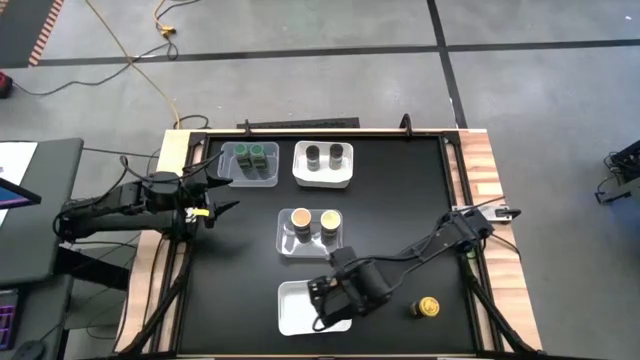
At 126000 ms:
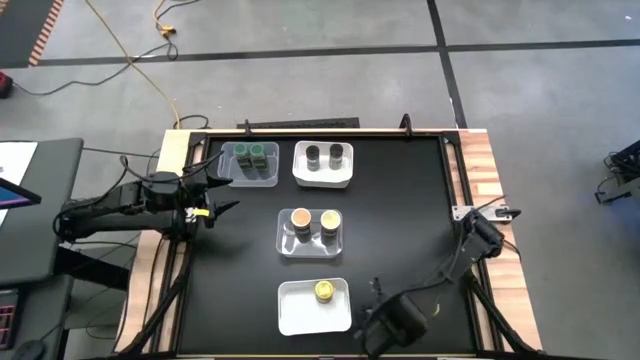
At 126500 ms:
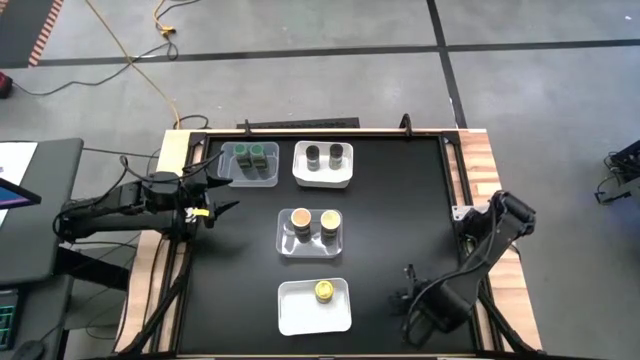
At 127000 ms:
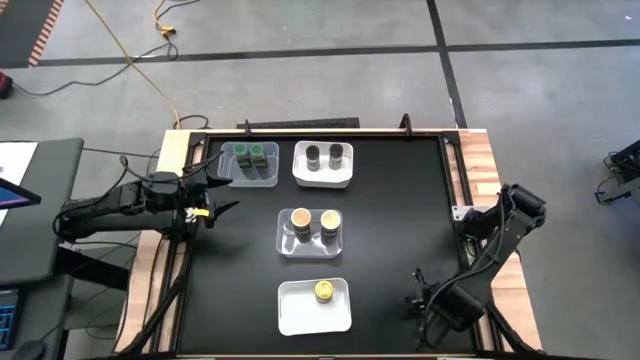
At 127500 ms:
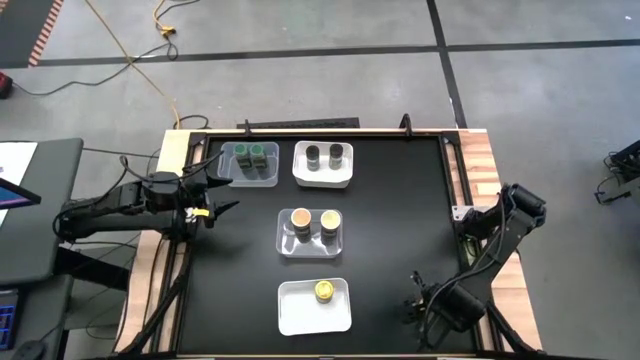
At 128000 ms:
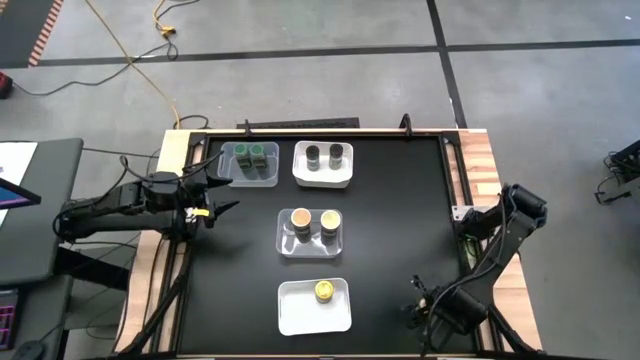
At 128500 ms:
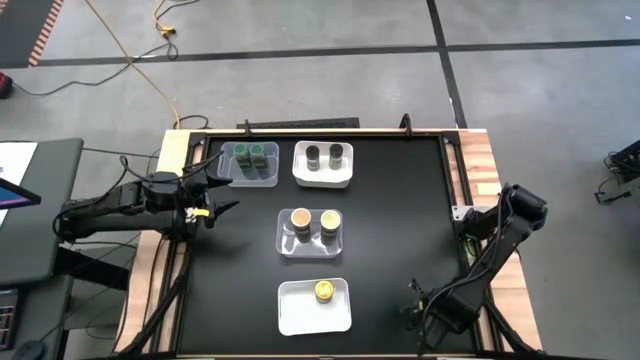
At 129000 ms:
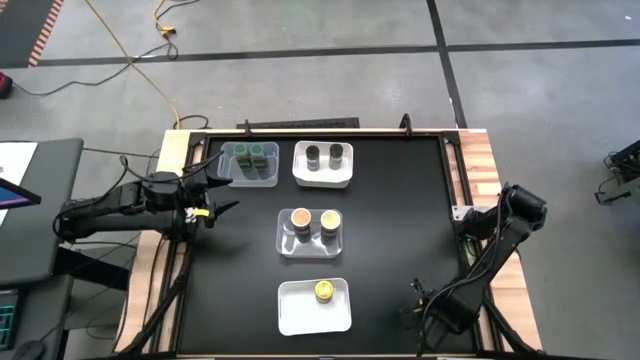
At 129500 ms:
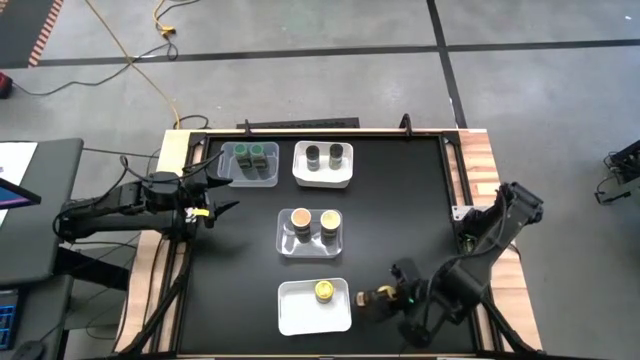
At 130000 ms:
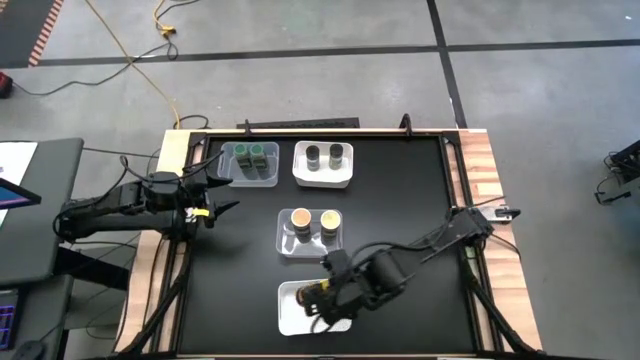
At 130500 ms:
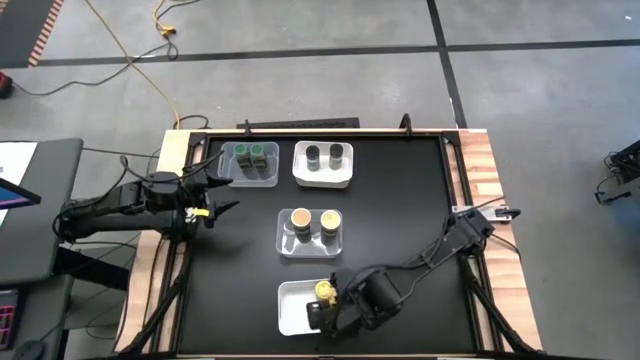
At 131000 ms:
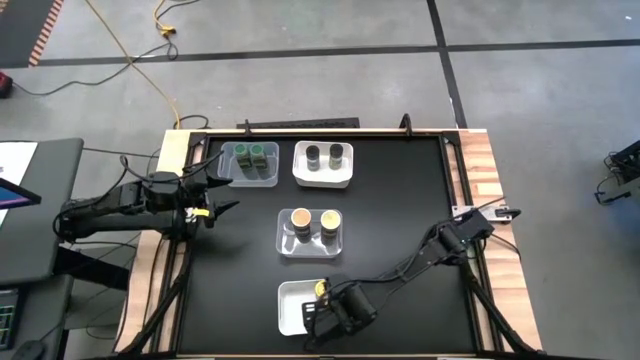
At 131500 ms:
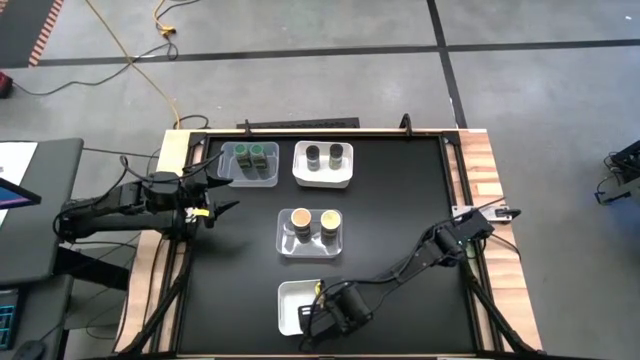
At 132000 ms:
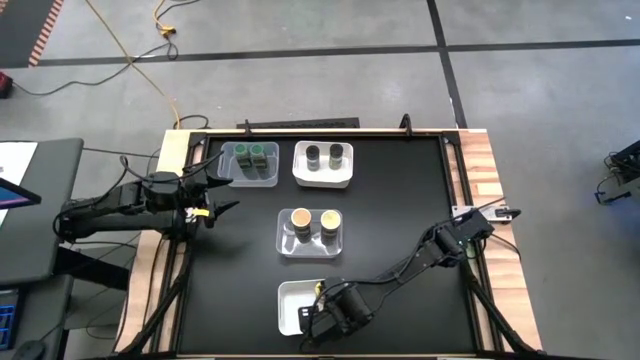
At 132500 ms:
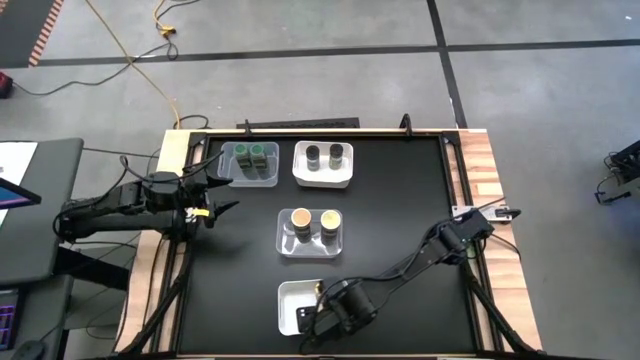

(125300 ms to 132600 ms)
Task: Sort spices by type
Put the yellow seasoning bottle into the bottom white bin

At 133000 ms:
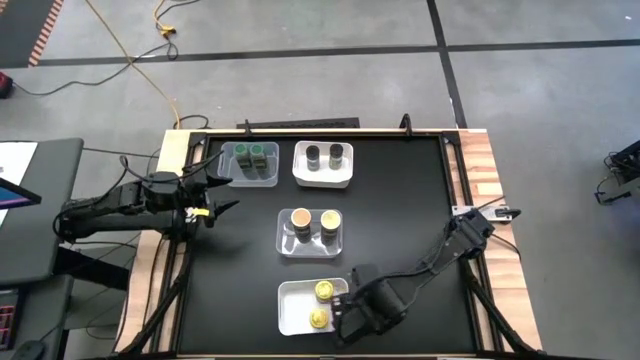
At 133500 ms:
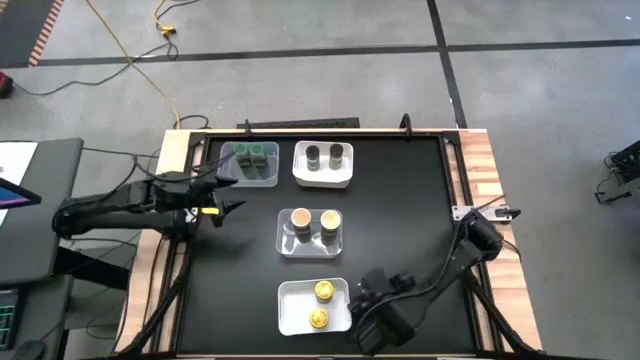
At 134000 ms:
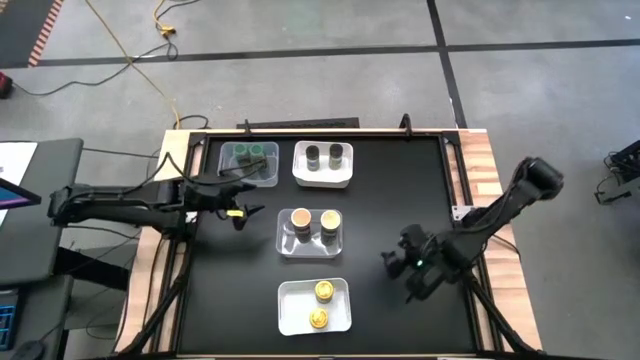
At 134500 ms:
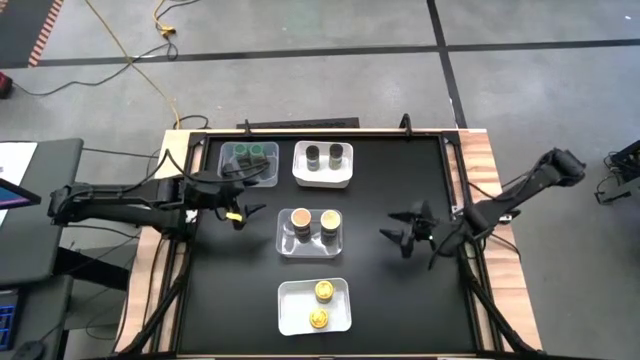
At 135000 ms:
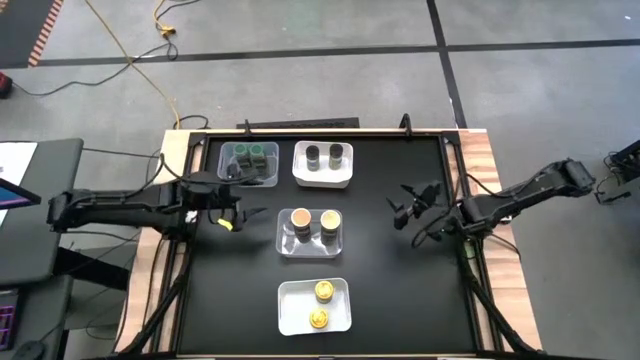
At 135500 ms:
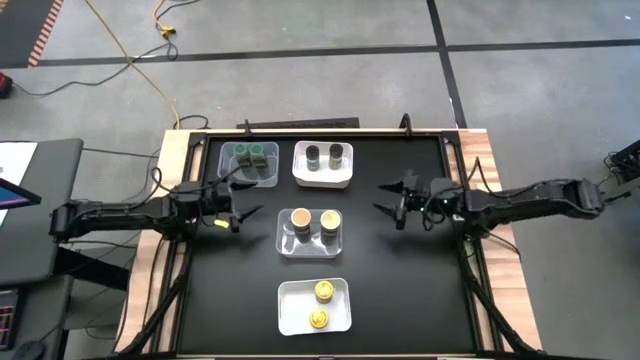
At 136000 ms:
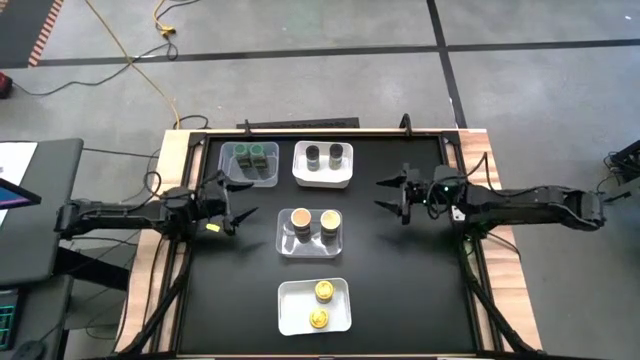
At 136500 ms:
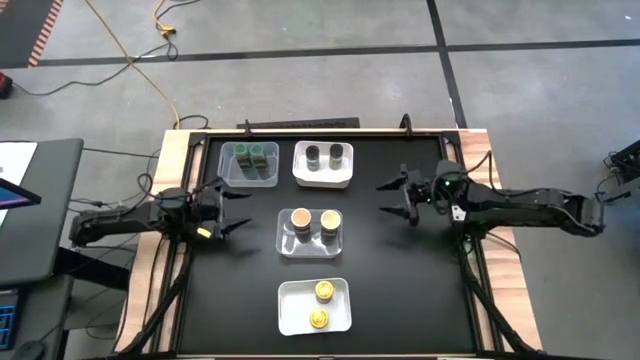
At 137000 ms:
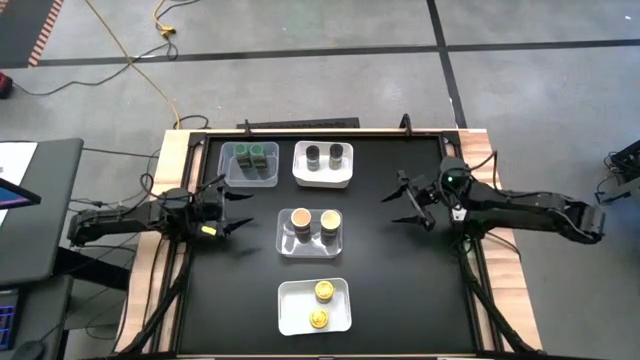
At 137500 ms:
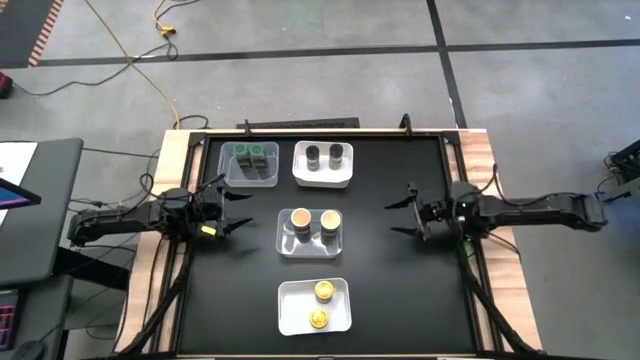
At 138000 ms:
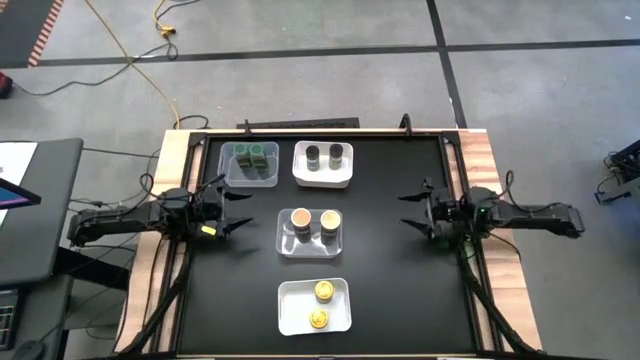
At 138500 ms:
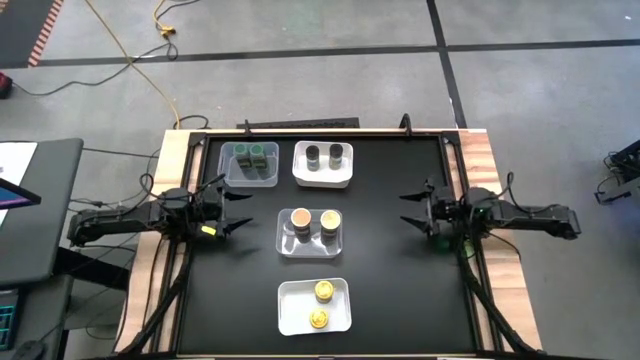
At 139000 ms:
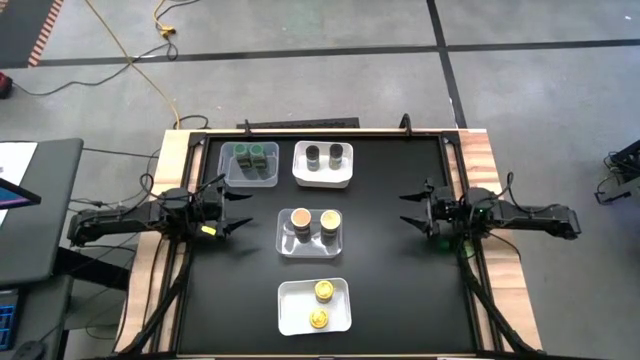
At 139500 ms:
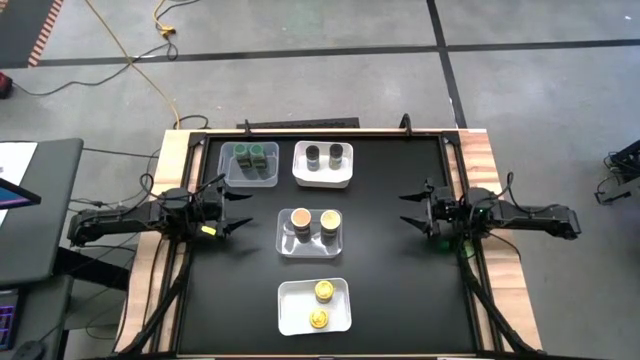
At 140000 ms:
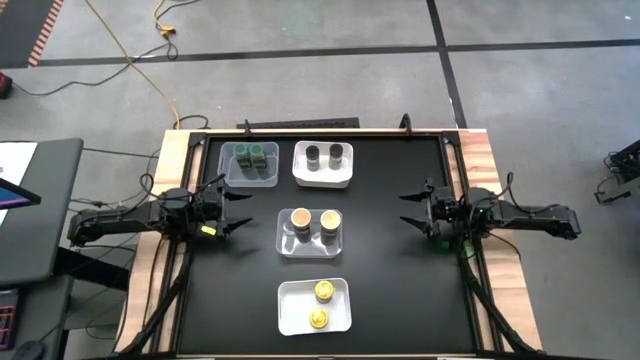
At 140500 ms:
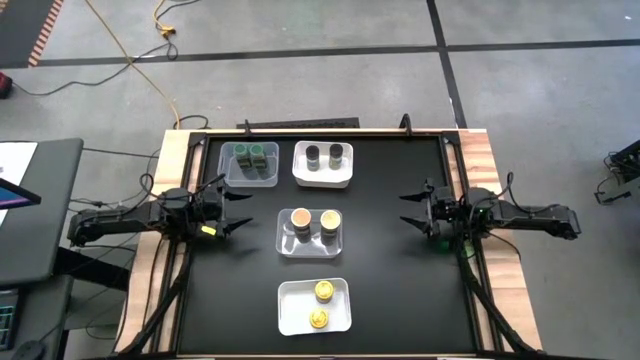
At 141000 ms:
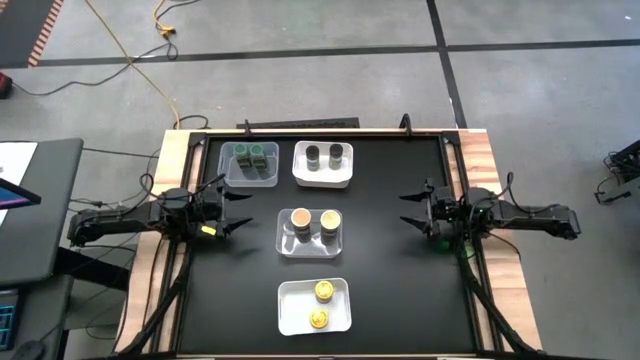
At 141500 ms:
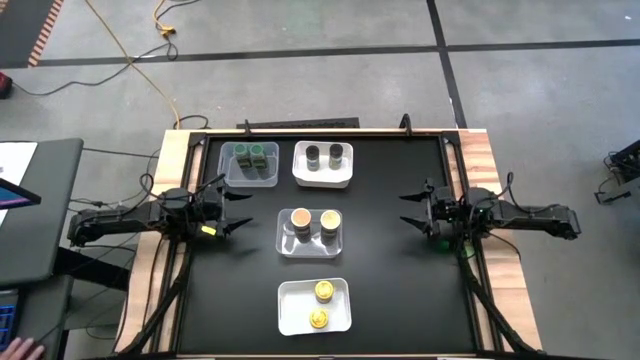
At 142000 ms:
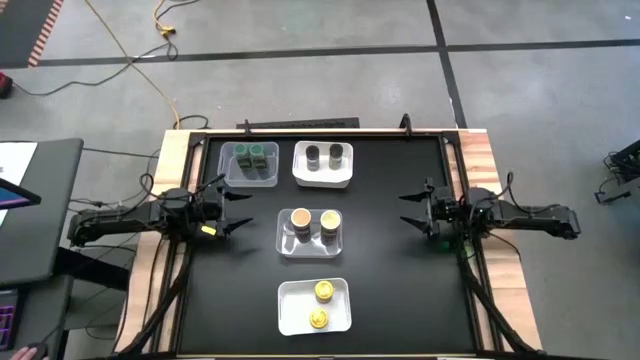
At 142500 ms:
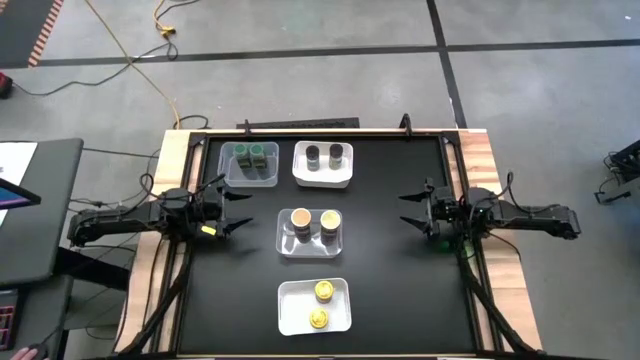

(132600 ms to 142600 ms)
Return to Home Position

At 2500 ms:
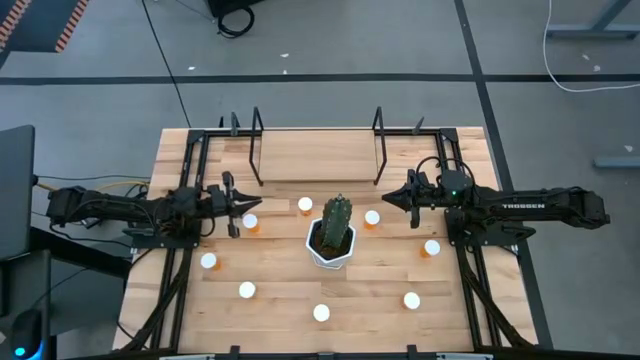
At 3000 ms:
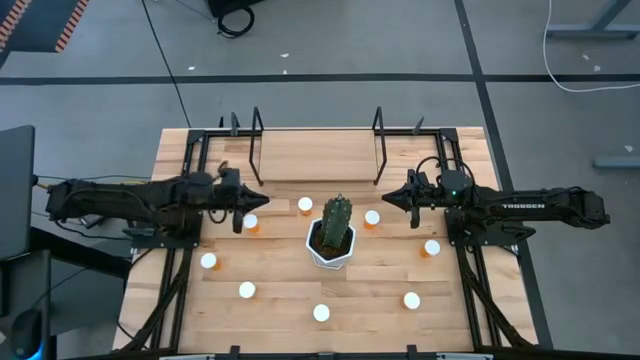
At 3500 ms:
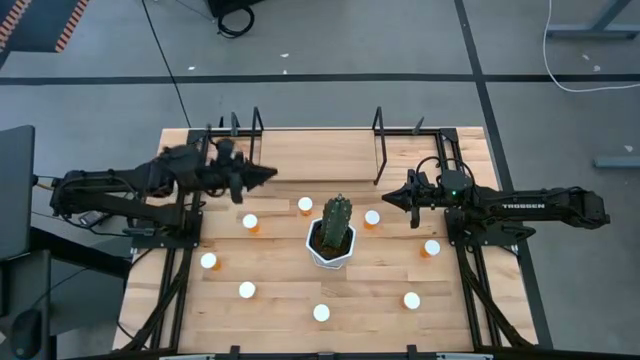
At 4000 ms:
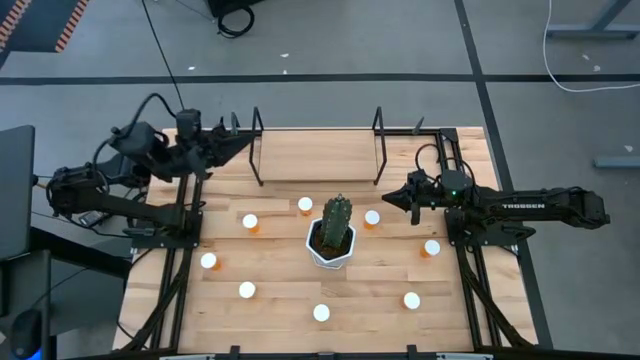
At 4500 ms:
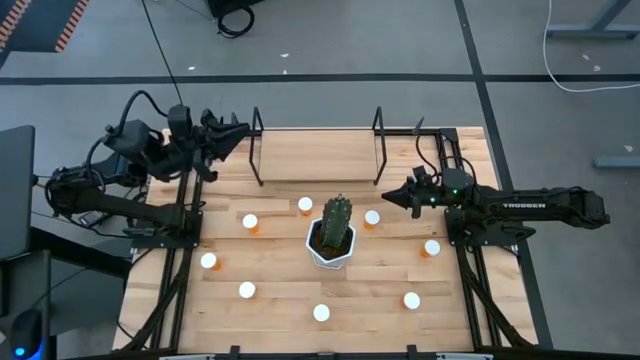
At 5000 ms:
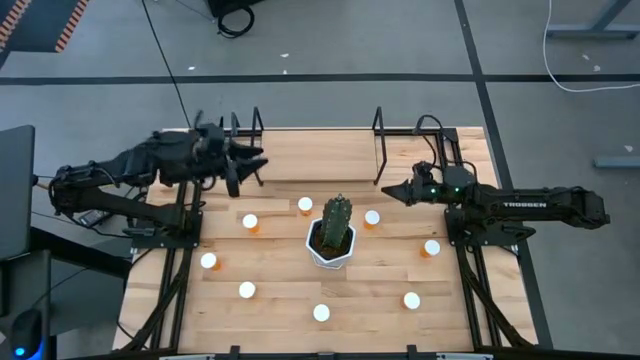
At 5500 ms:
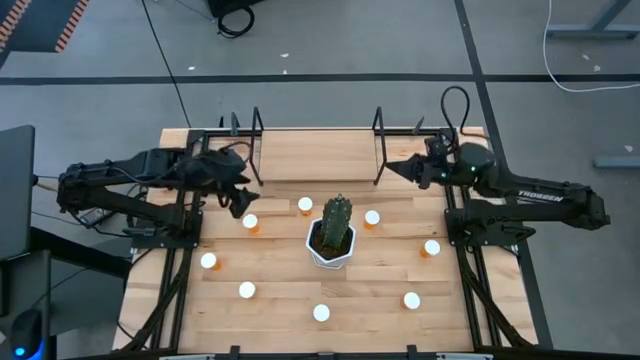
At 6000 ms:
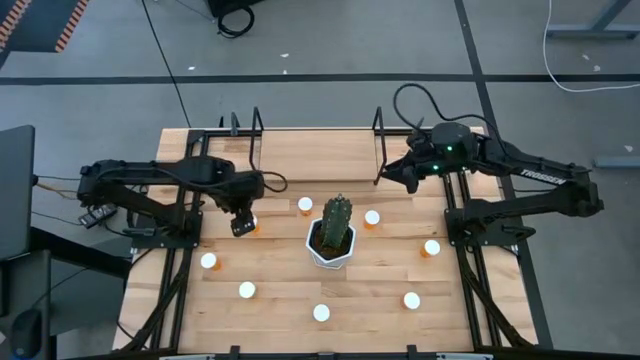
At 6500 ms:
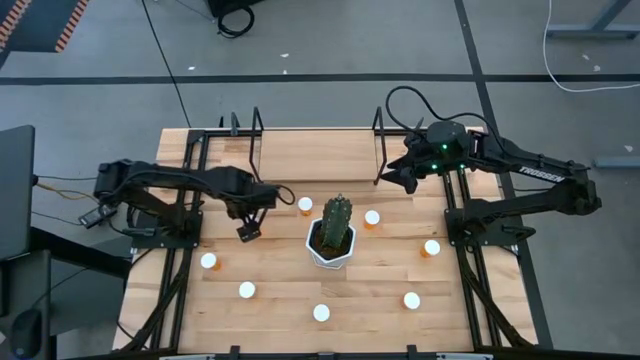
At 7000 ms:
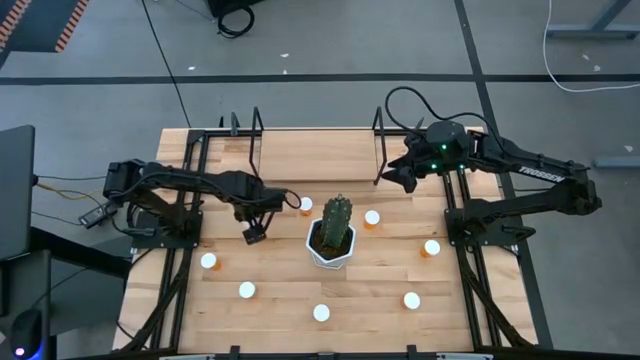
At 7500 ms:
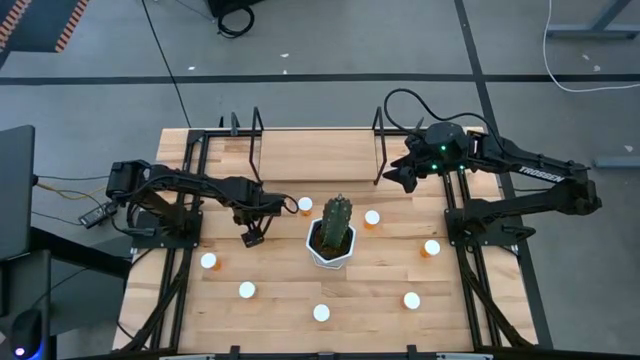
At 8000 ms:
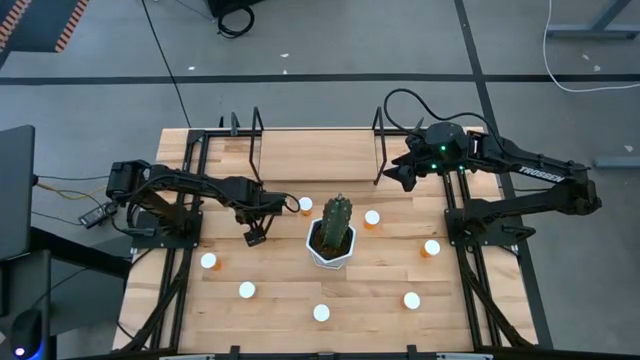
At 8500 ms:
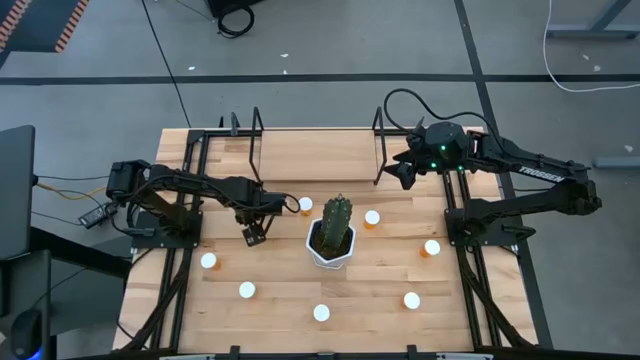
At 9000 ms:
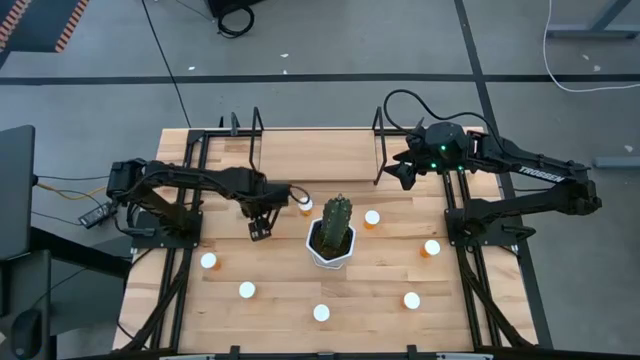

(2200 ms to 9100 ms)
Task: Pick and place medicine bottles onto shelf by color
Put the orange medicine bottle on the shelf
